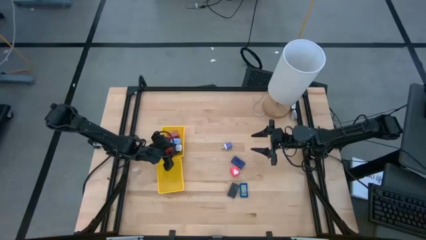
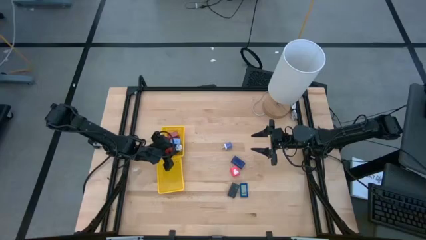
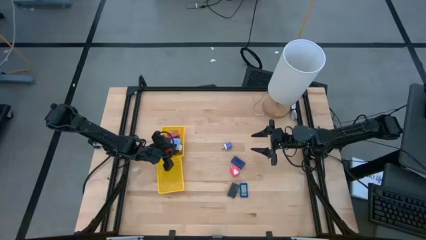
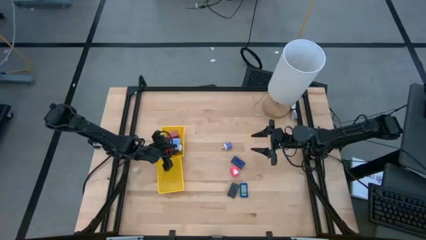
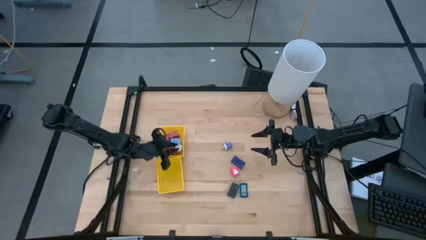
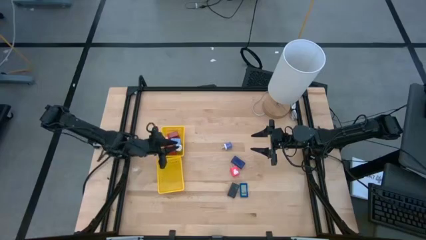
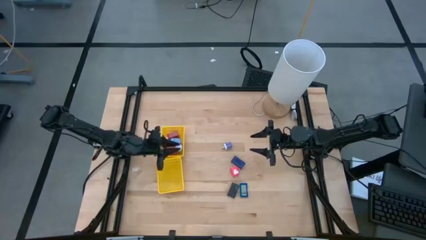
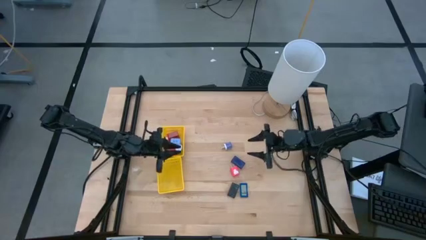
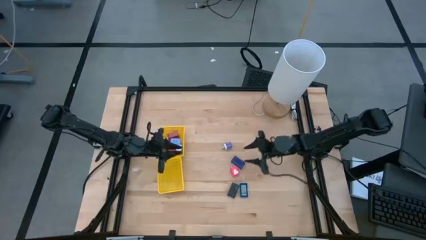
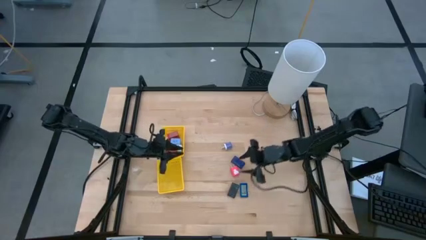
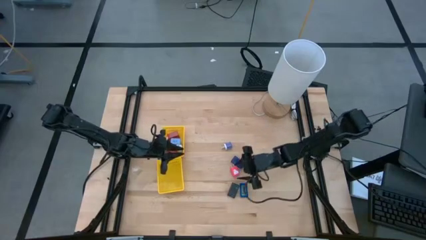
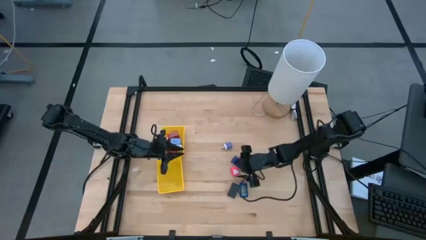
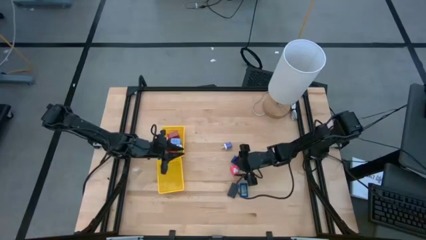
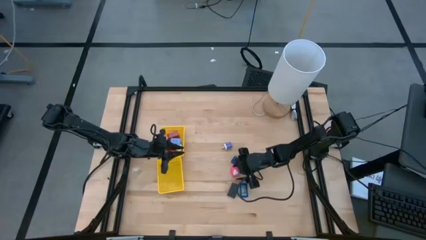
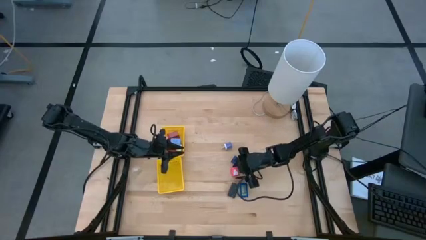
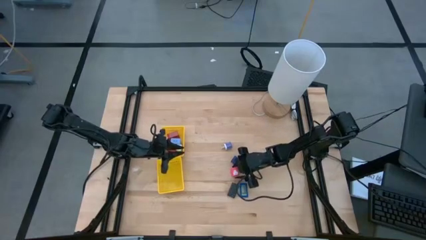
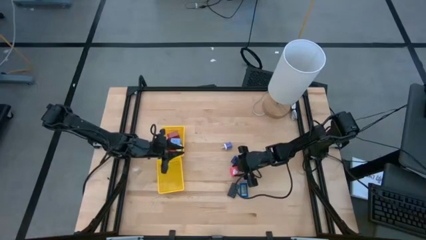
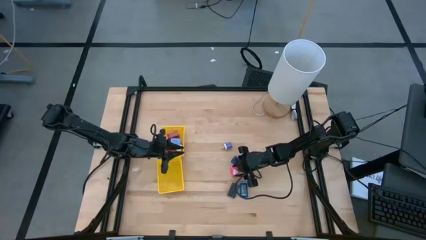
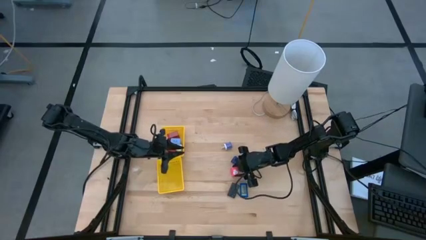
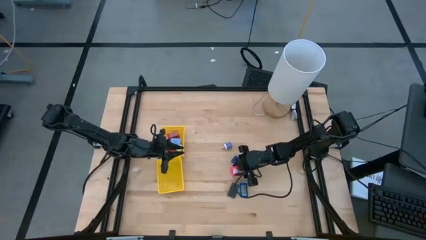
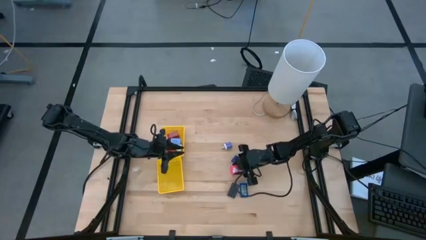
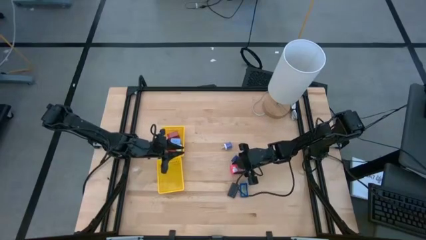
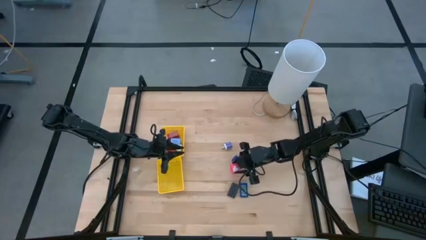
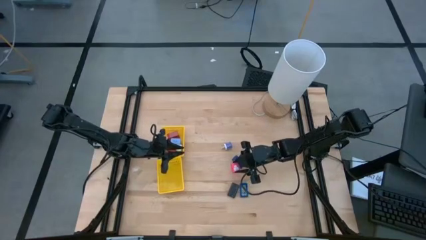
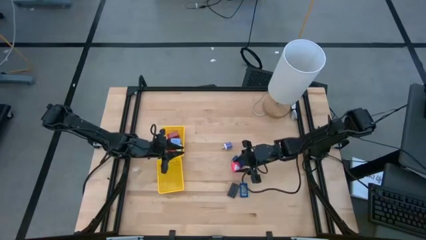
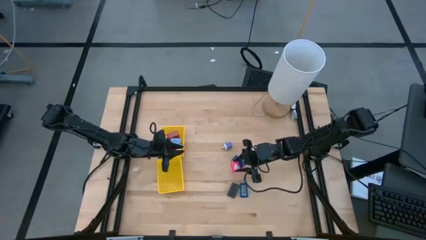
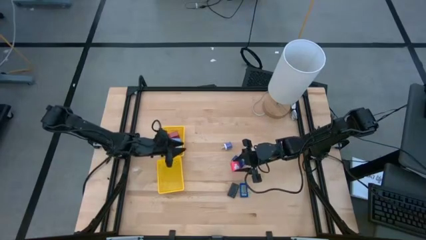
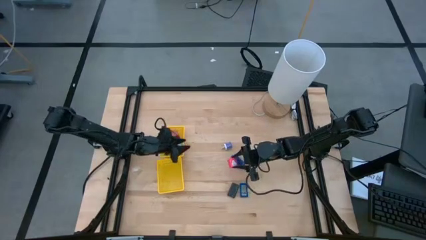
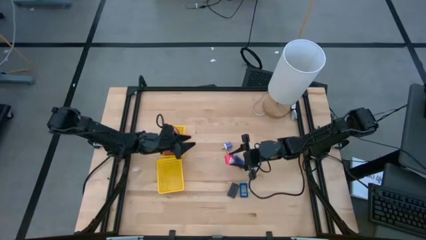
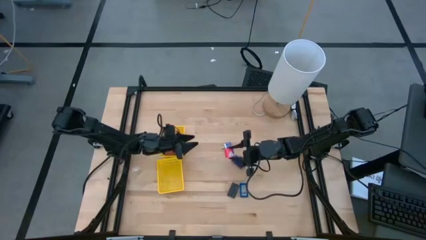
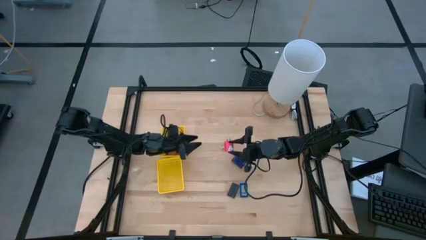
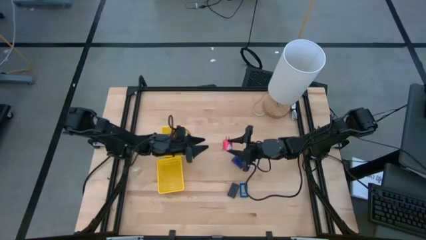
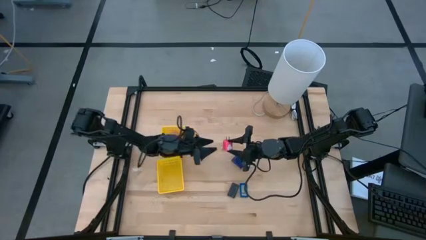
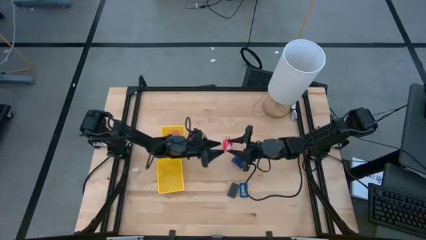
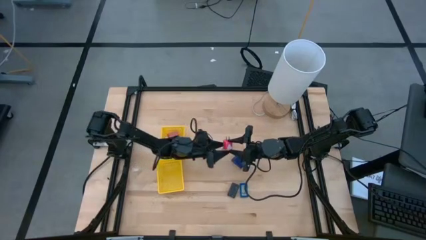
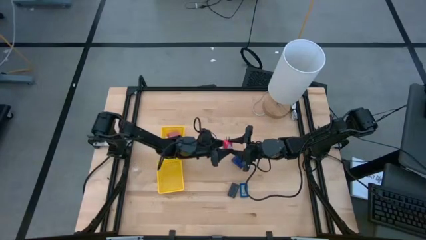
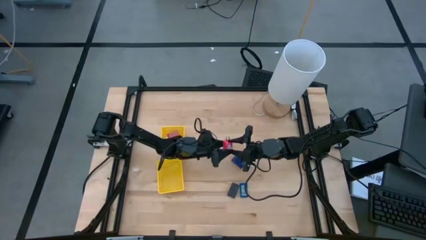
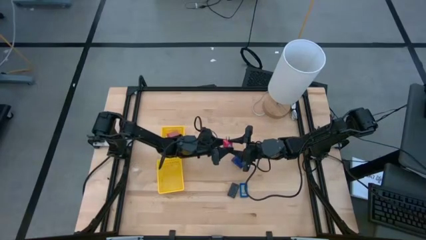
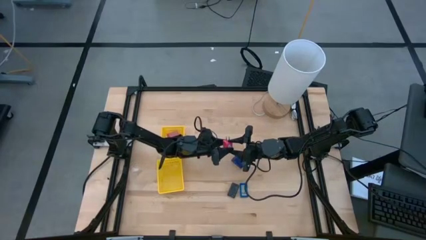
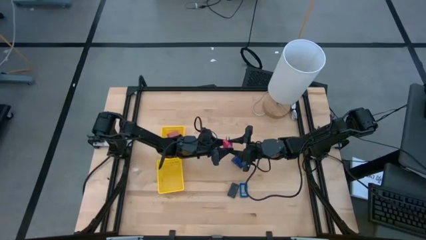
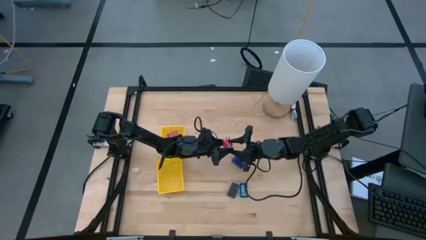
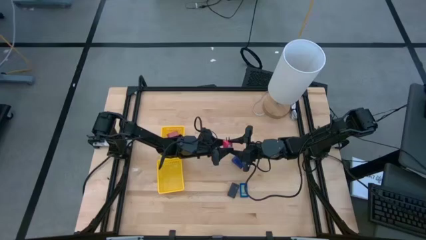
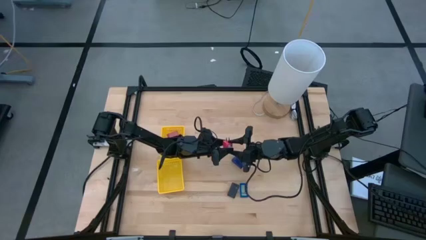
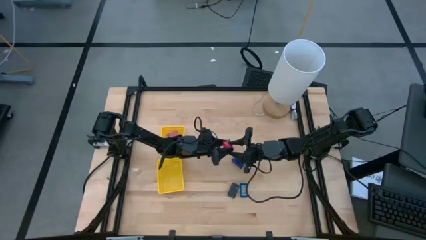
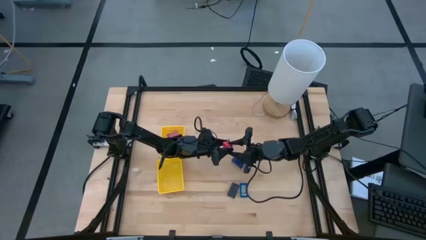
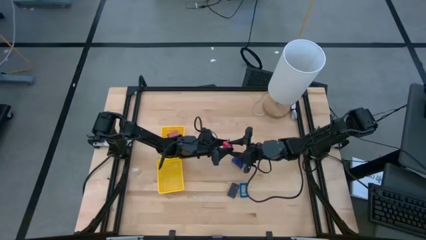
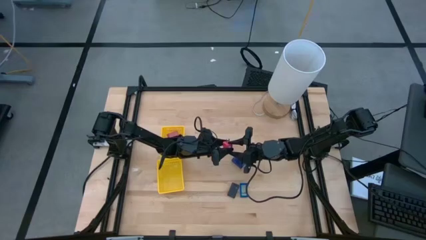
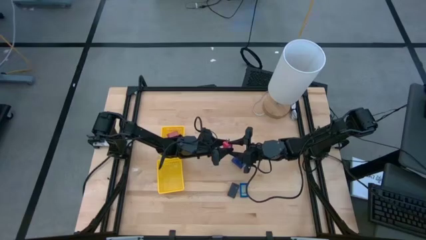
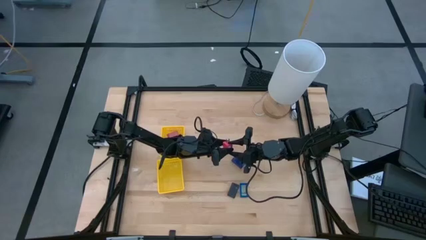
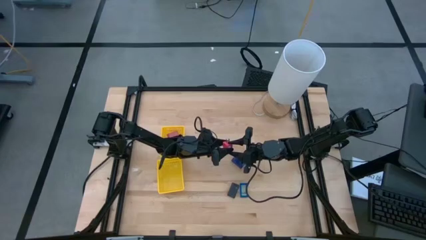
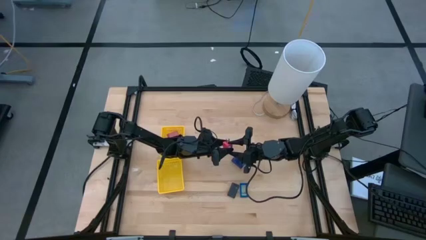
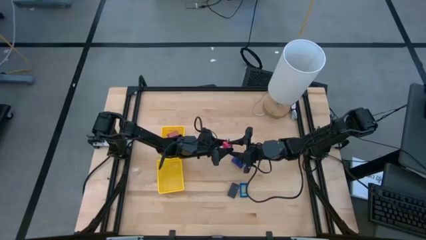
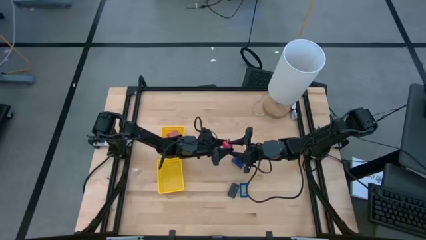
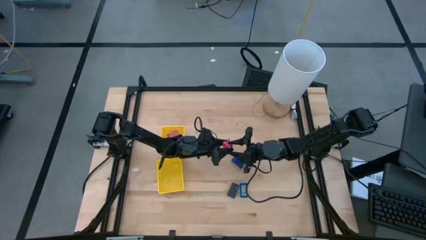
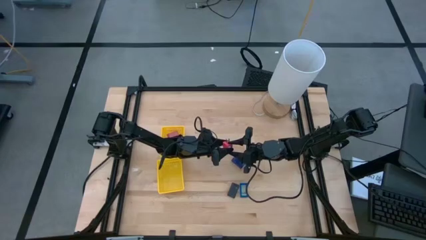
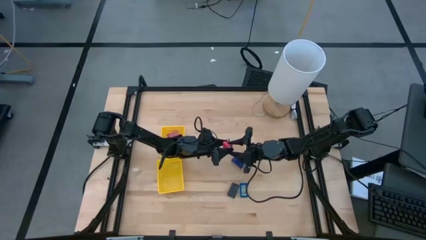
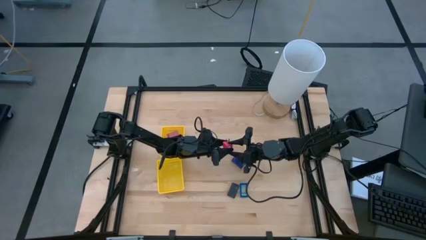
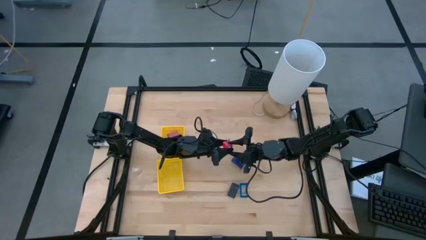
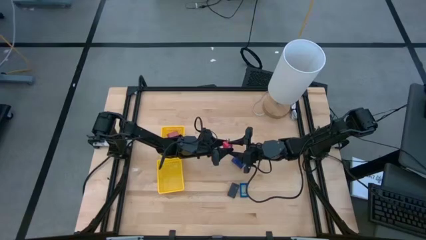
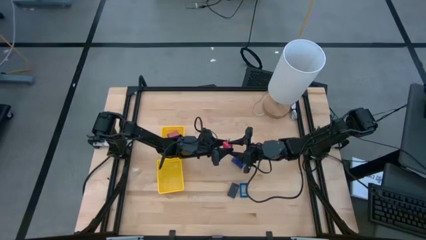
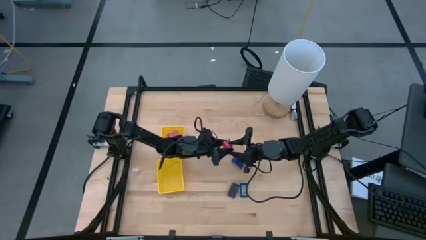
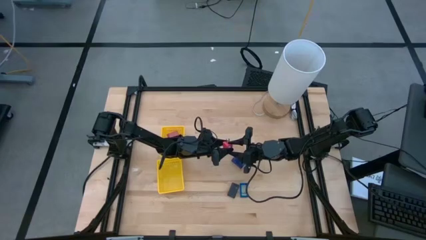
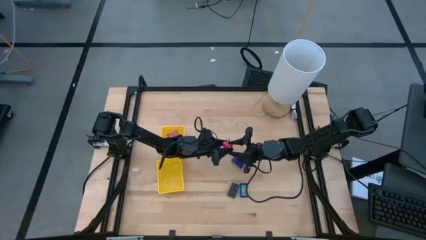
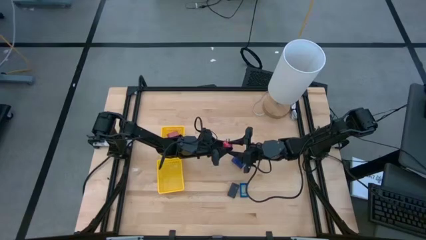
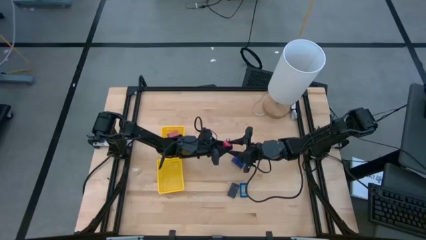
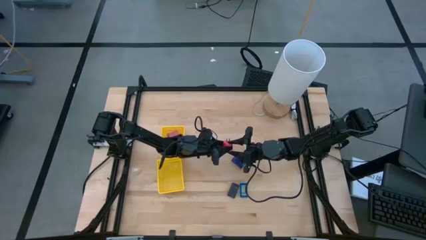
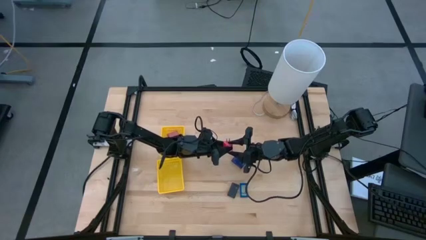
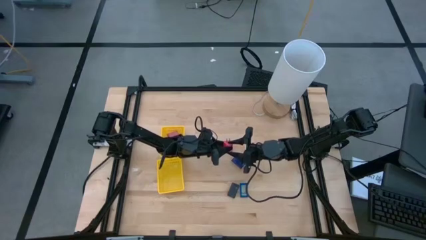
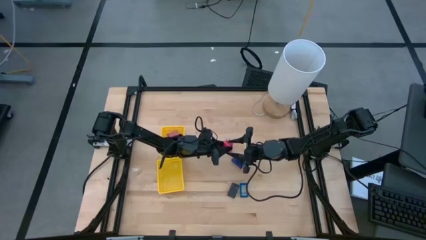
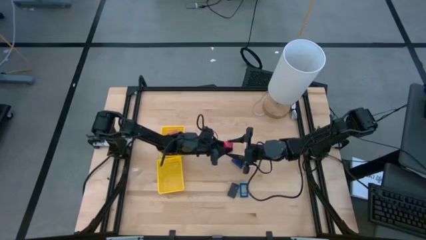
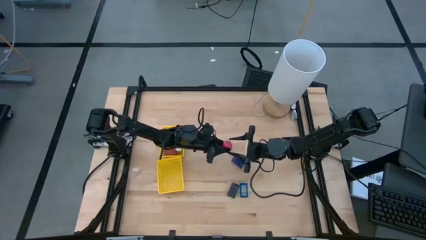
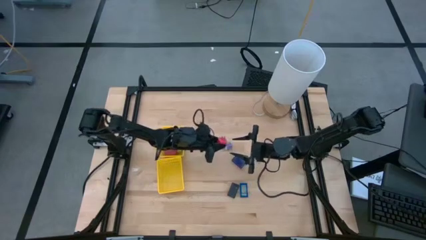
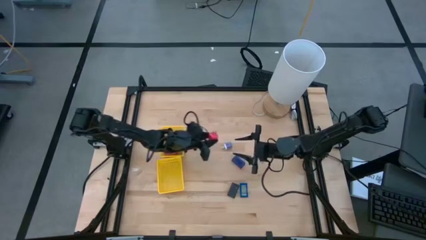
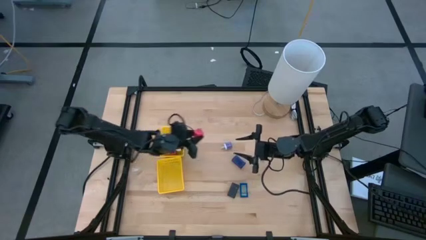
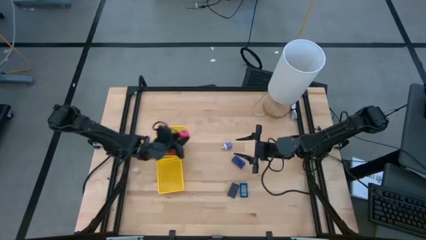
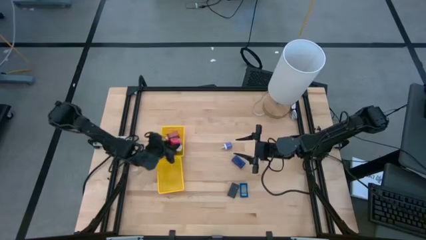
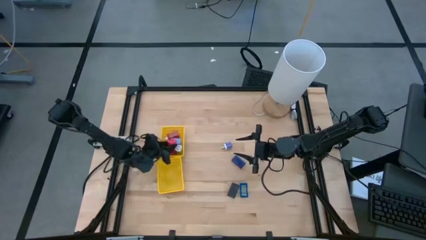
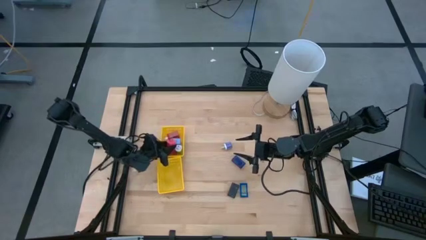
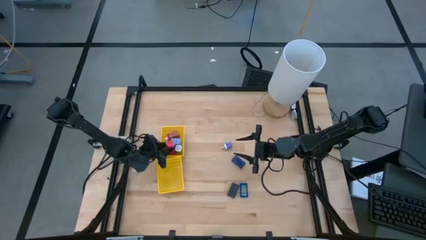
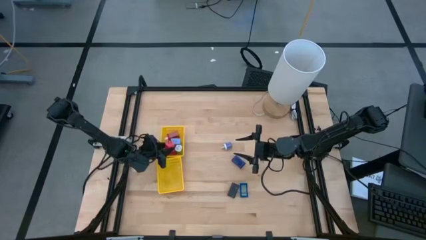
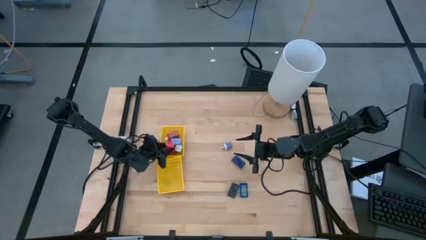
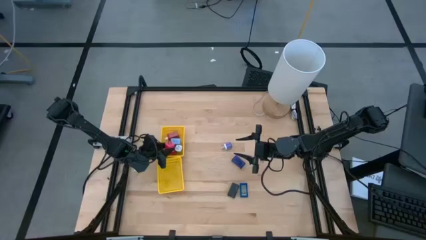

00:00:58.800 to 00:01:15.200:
Task: Pick & Place Office items
Put the pink charger adapter into the top yellow bin
